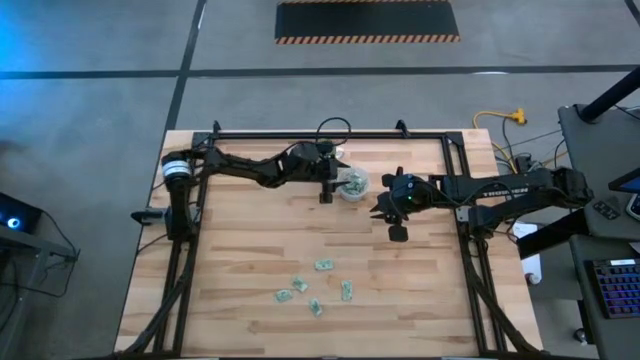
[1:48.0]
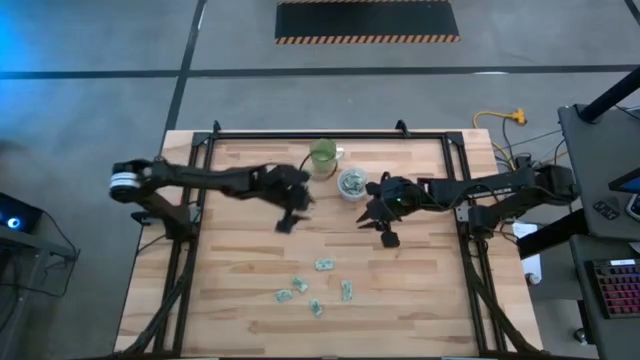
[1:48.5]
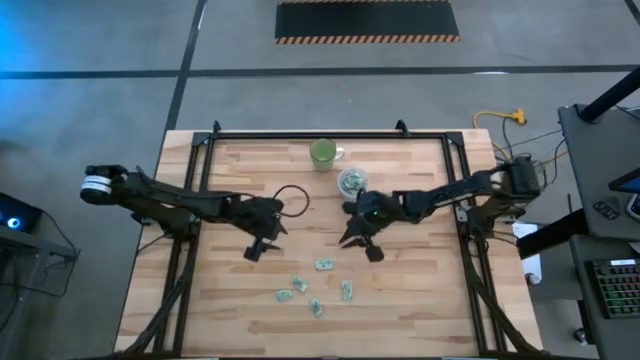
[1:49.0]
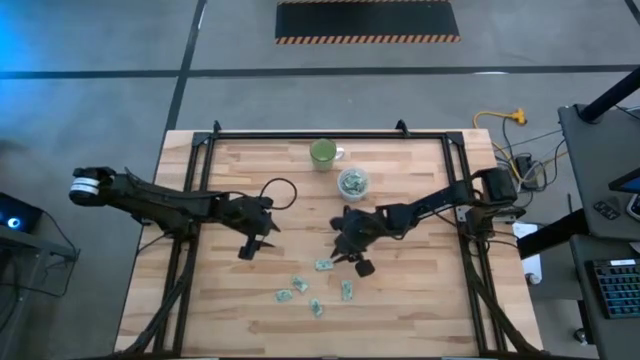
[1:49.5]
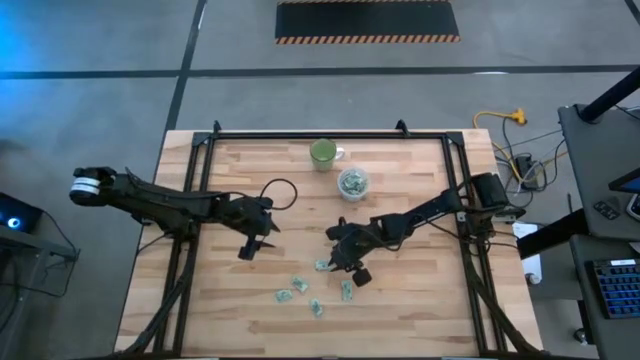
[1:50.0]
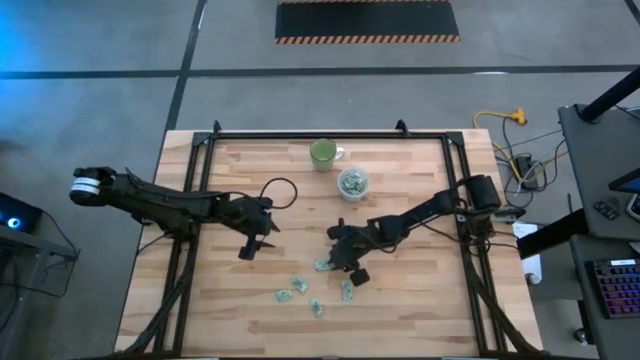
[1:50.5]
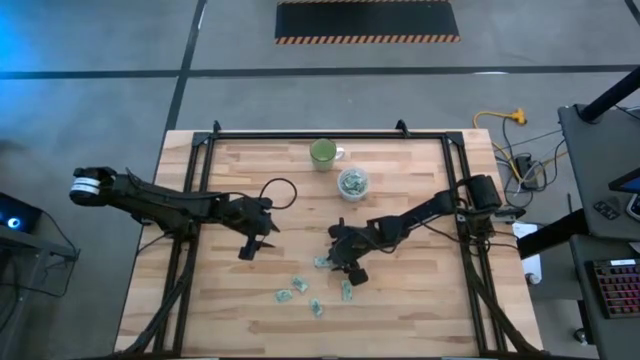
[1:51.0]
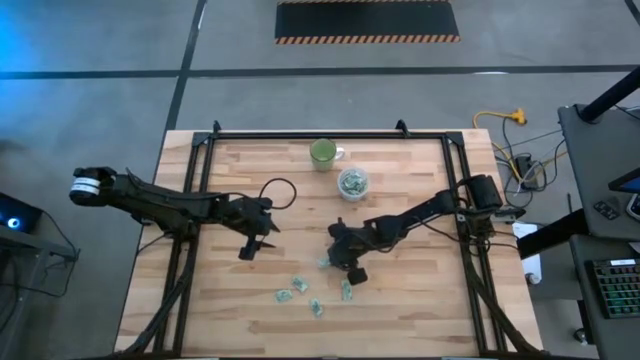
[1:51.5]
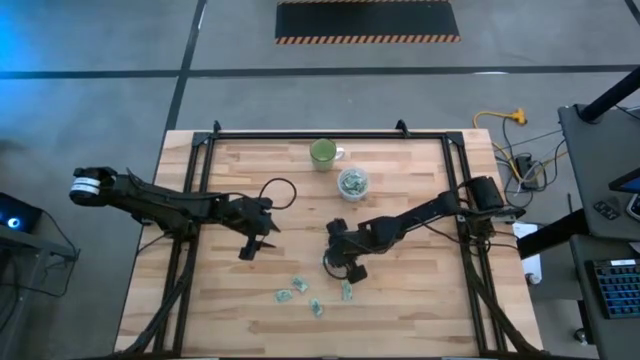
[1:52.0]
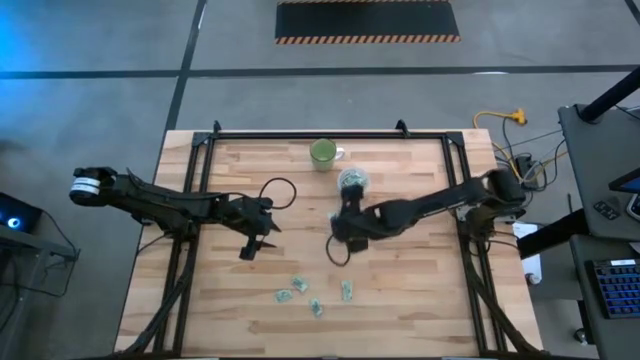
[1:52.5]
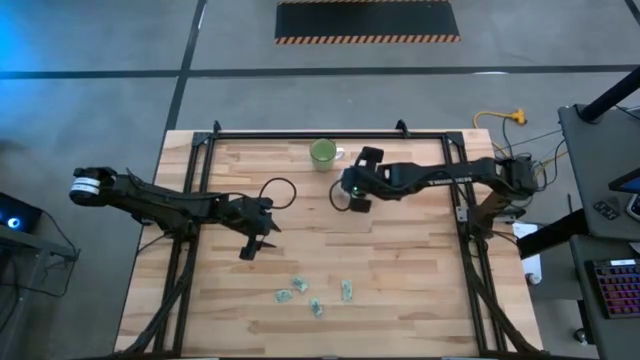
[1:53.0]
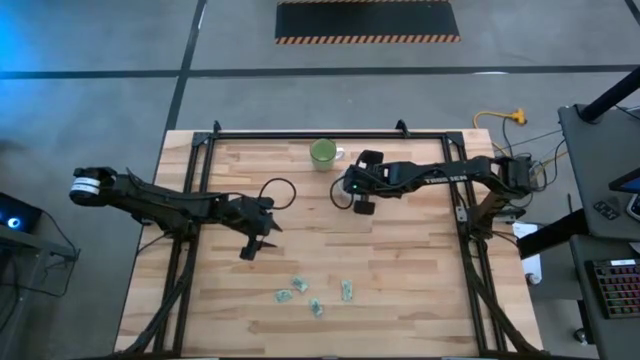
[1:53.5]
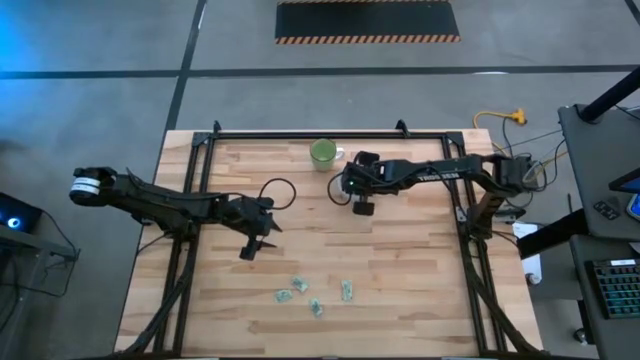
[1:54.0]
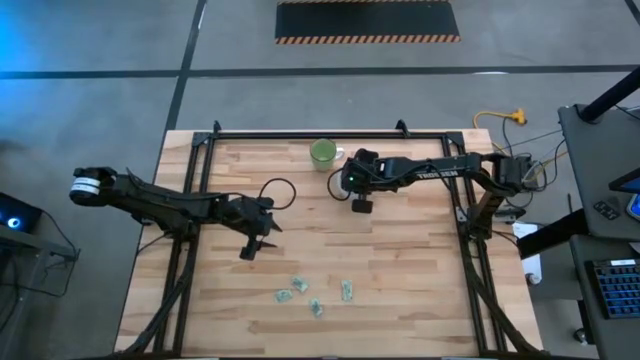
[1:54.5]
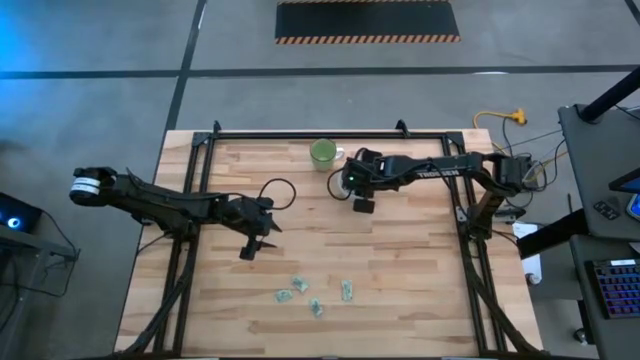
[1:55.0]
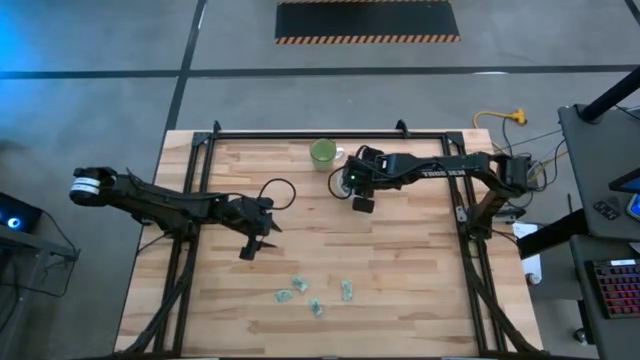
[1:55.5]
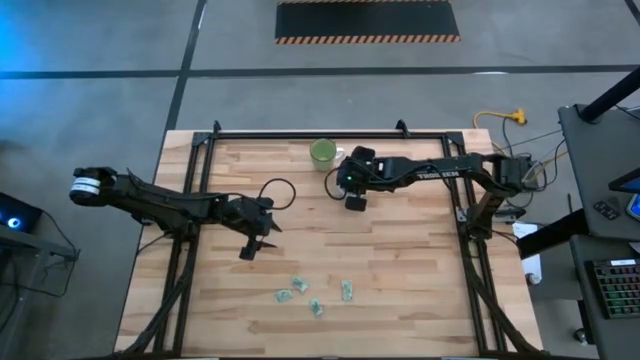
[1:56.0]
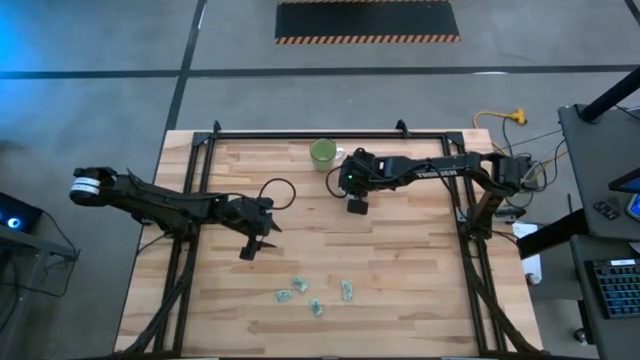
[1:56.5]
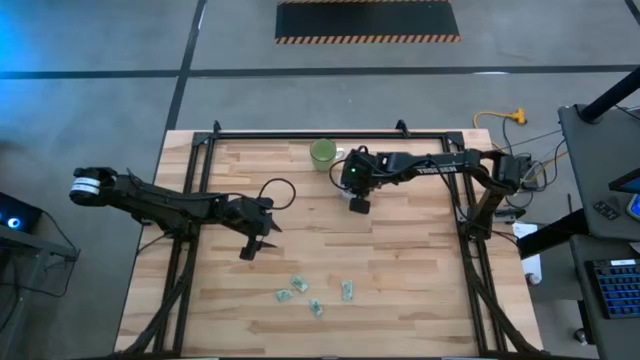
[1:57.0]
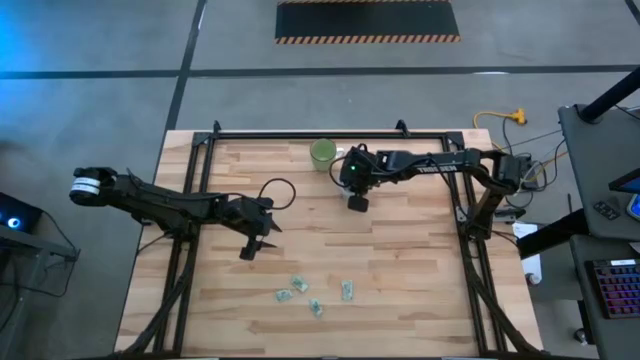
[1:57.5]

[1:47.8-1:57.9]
Task: Pick and place Stevia / Truvia into bins
Put the stevia packet into the transparent container

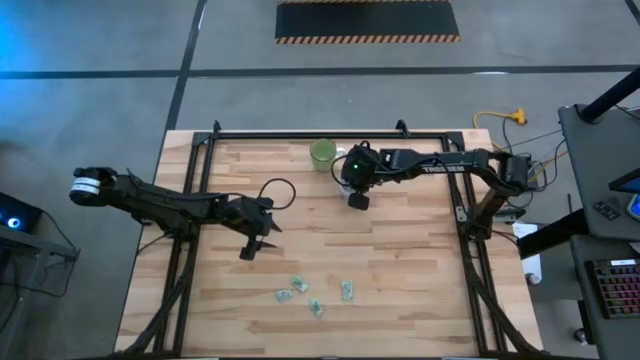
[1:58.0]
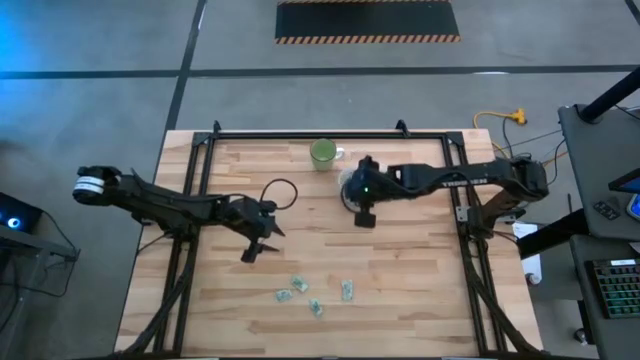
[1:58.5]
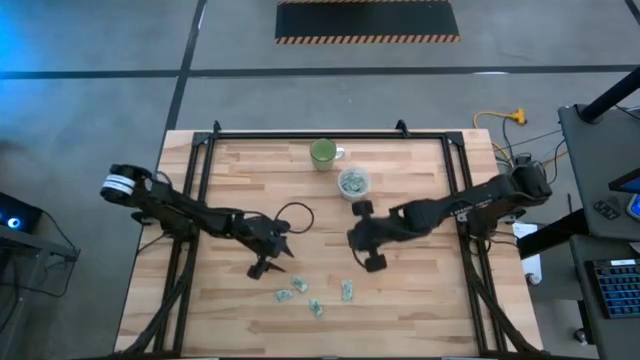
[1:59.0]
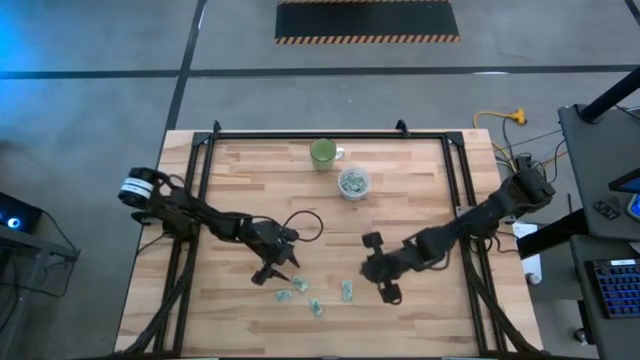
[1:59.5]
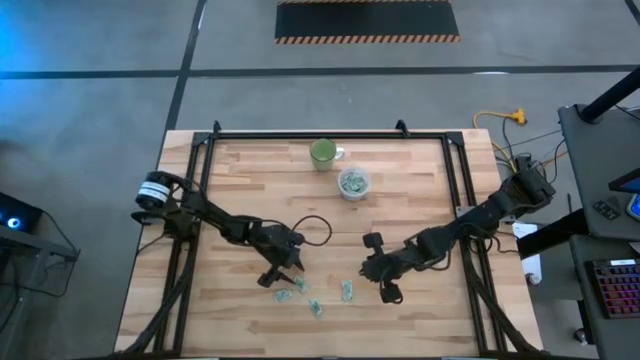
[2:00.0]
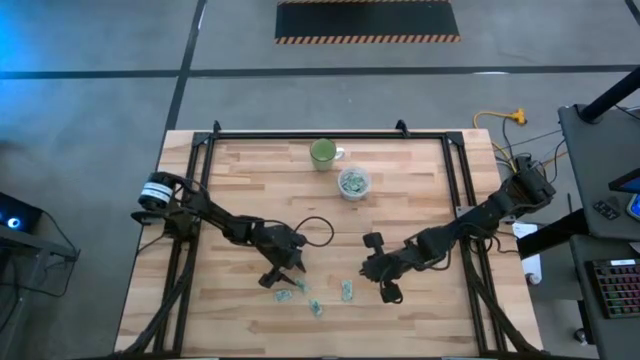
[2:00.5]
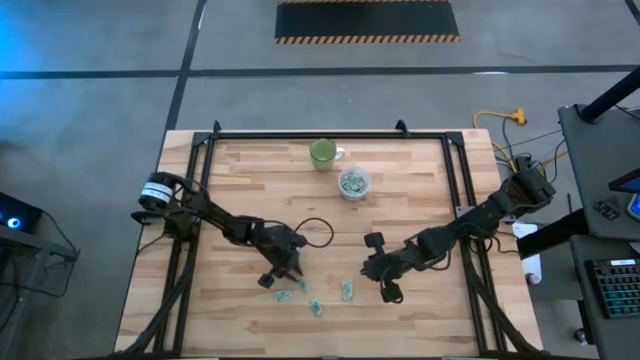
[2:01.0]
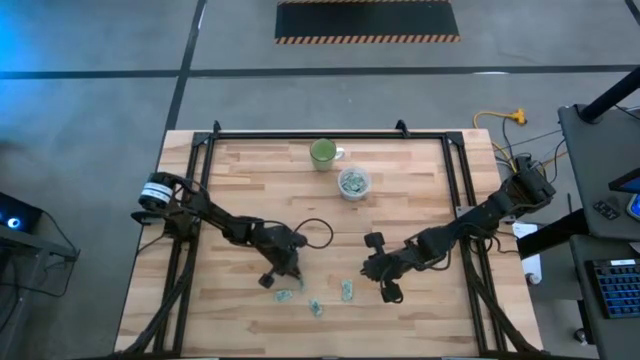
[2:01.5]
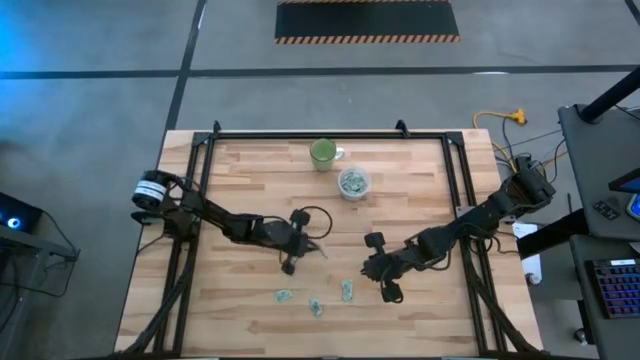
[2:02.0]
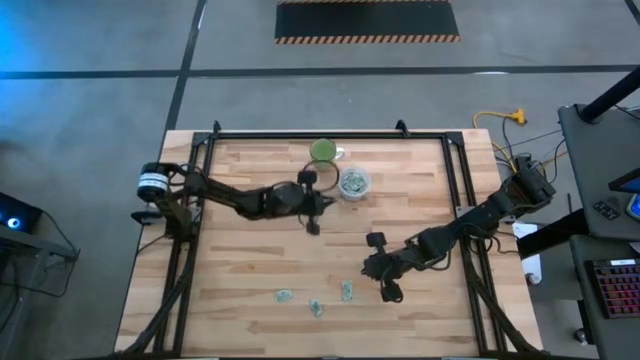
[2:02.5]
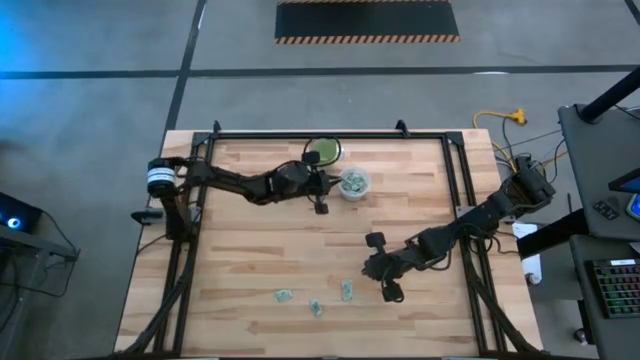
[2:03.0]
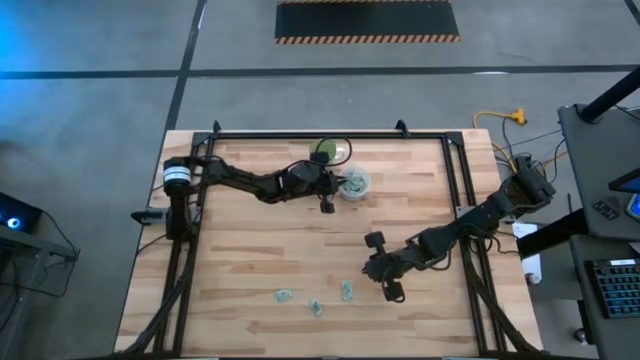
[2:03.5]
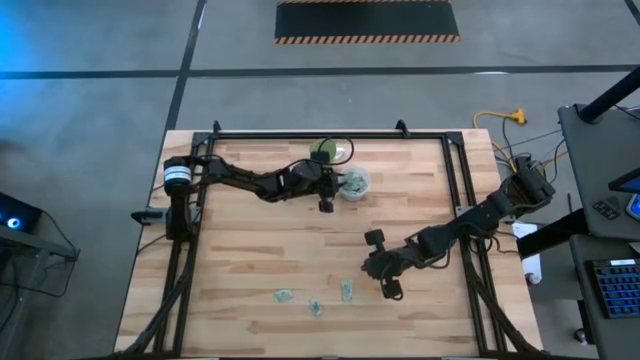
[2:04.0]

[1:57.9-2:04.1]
Put the stevia packet into the transparent container

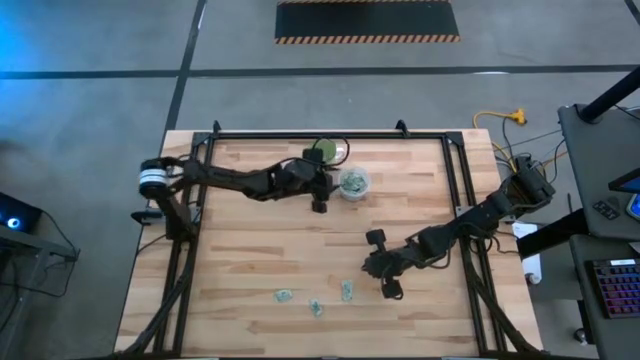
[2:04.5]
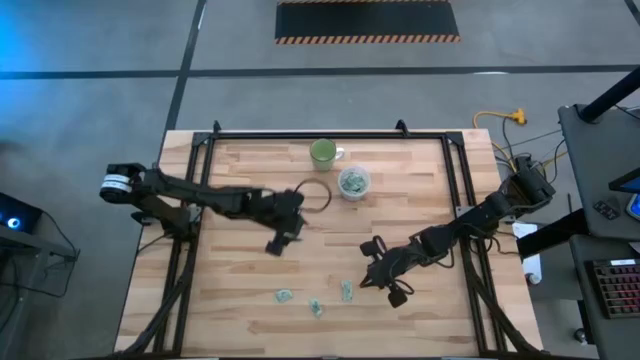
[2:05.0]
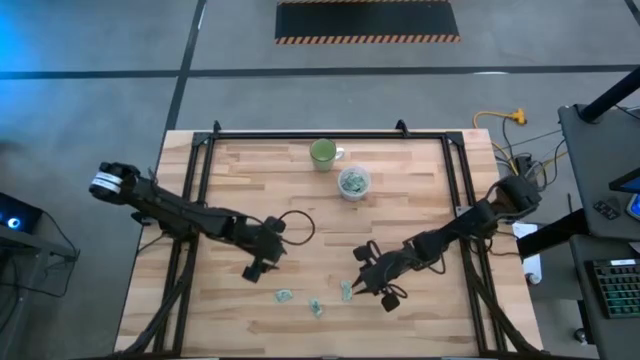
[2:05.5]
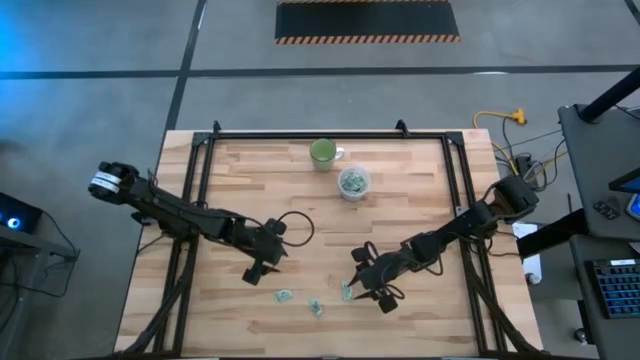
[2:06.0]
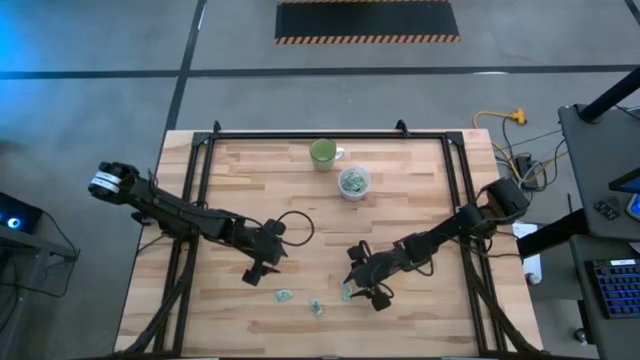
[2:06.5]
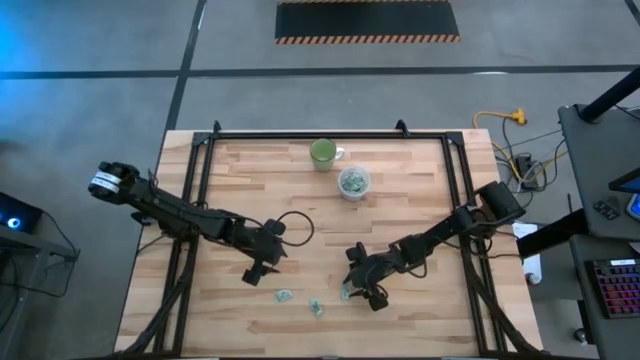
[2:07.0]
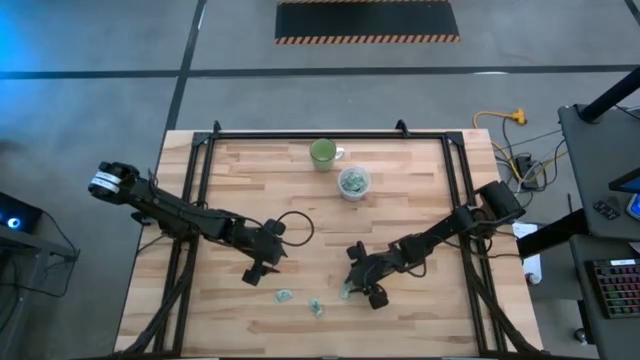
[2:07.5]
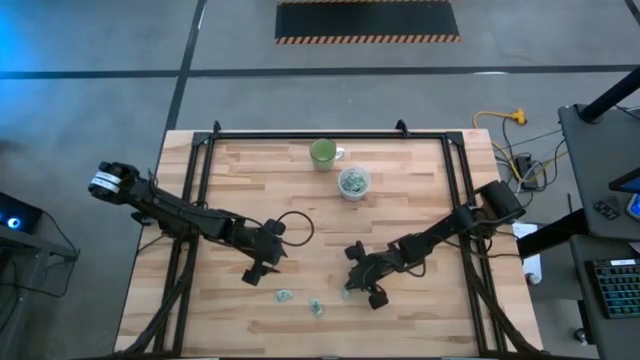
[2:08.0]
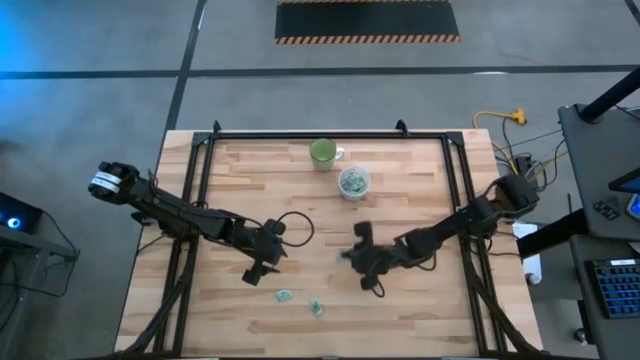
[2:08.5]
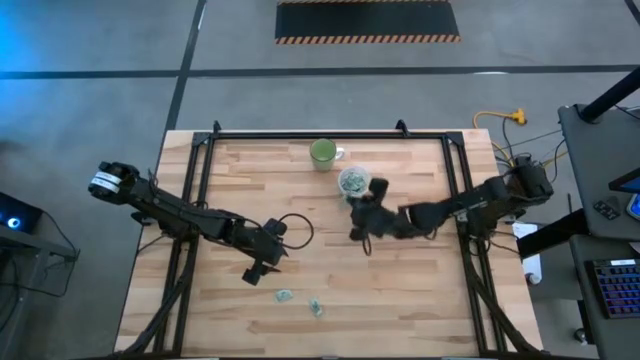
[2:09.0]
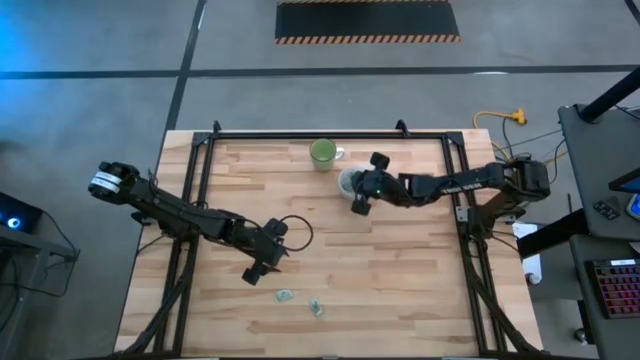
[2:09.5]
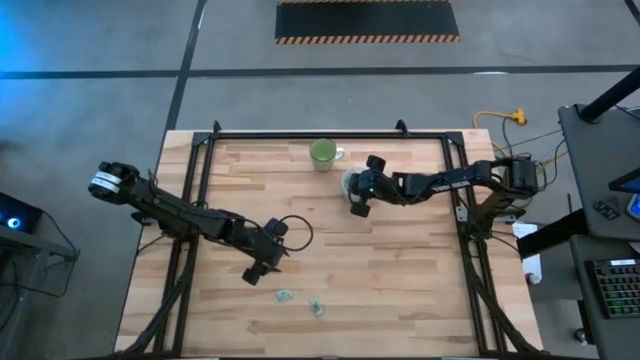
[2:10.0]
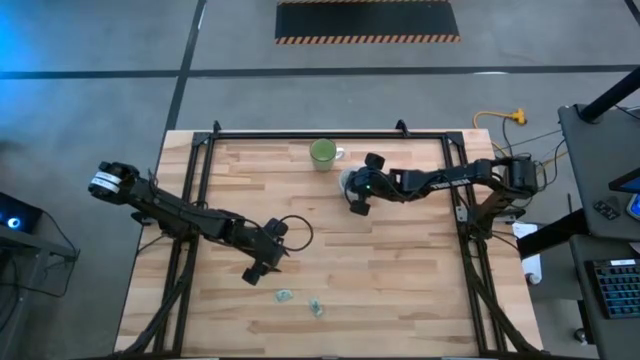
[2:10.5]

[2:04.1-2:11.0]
Put the stevia packet into the transparent container
